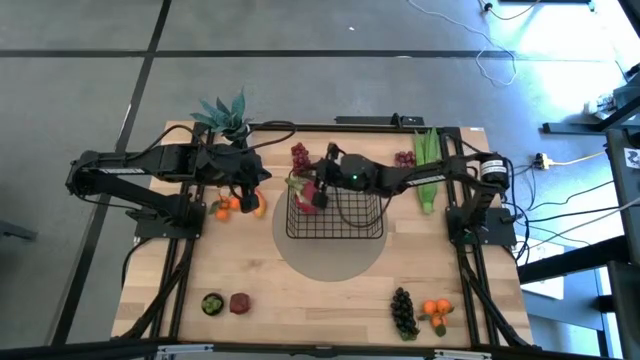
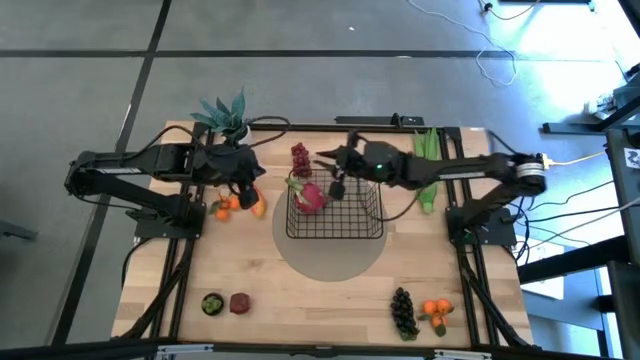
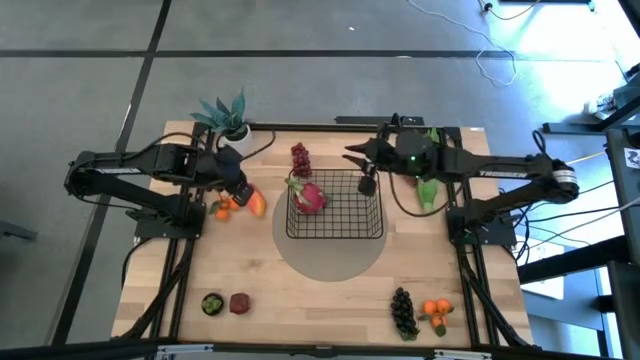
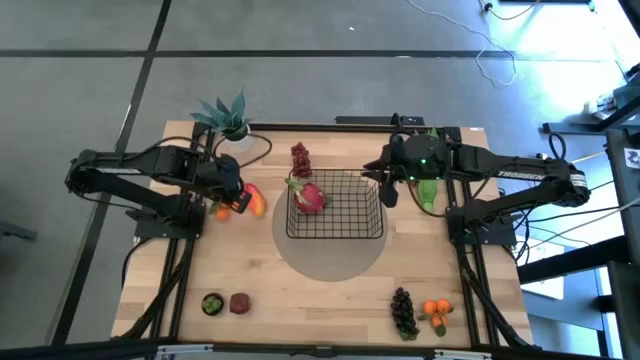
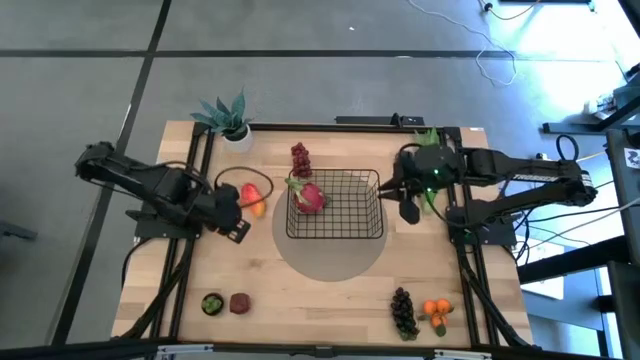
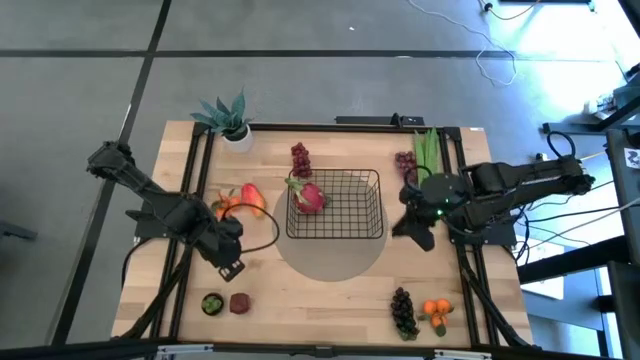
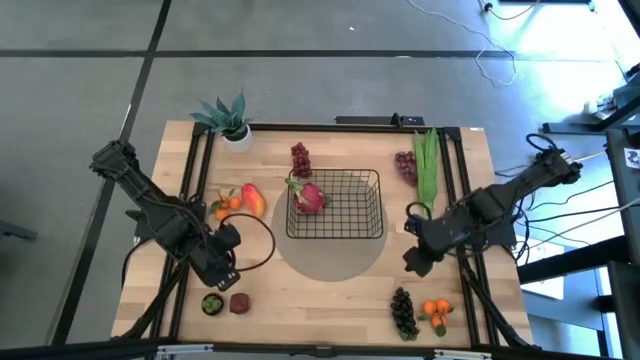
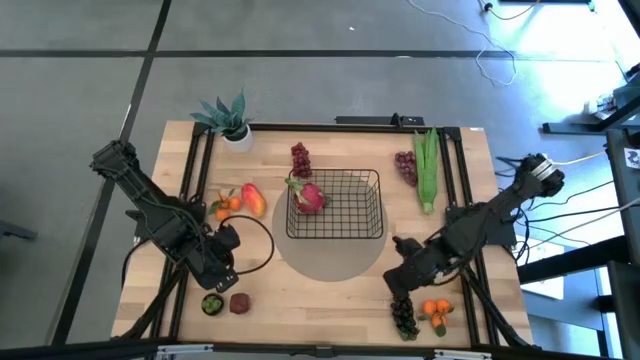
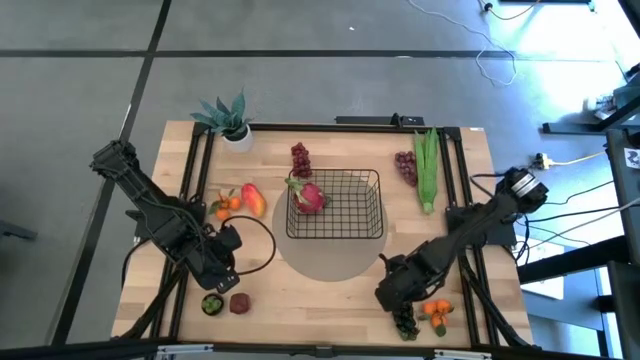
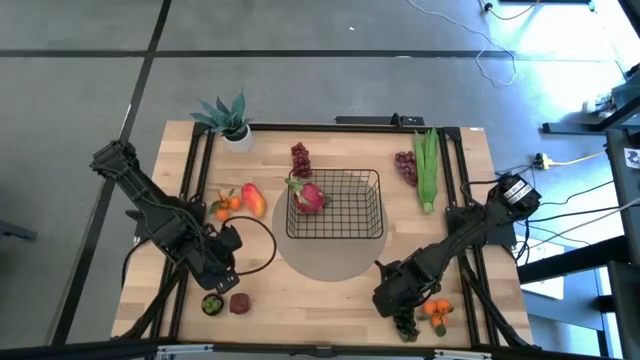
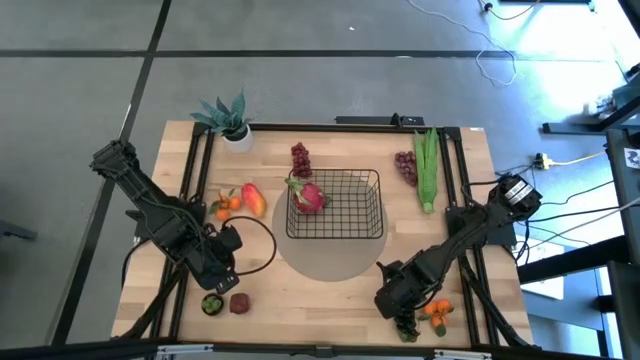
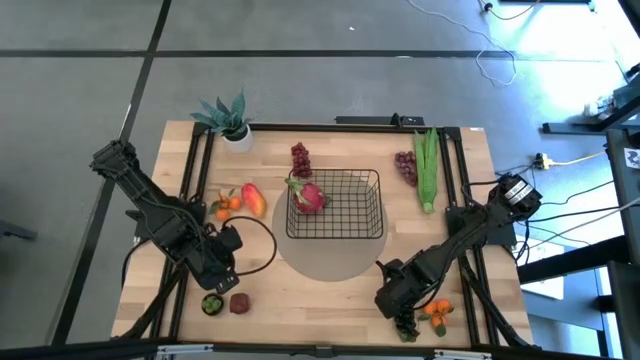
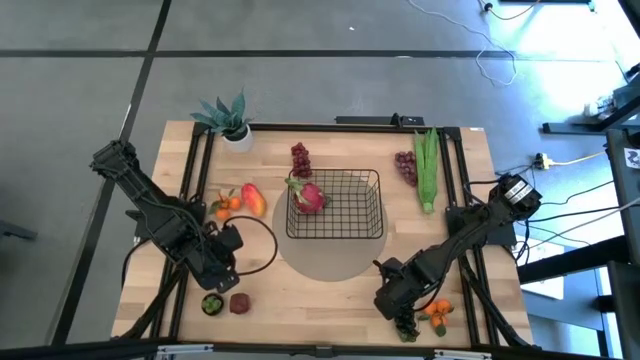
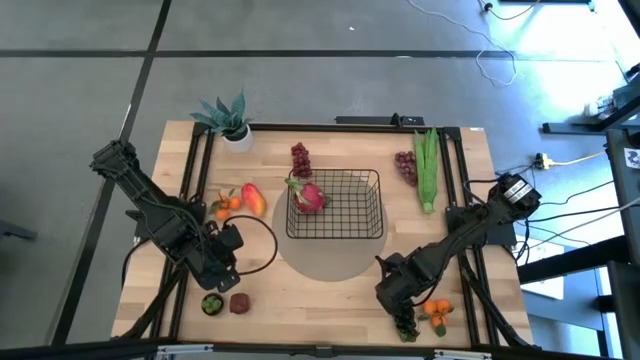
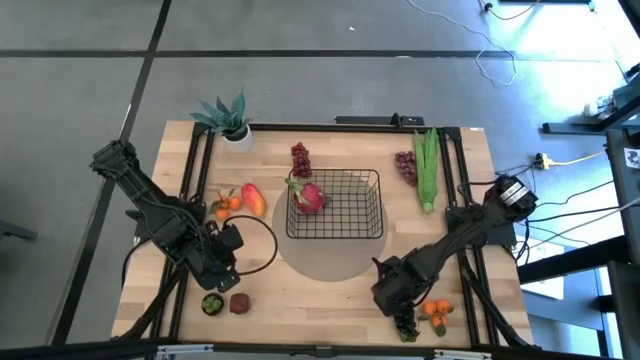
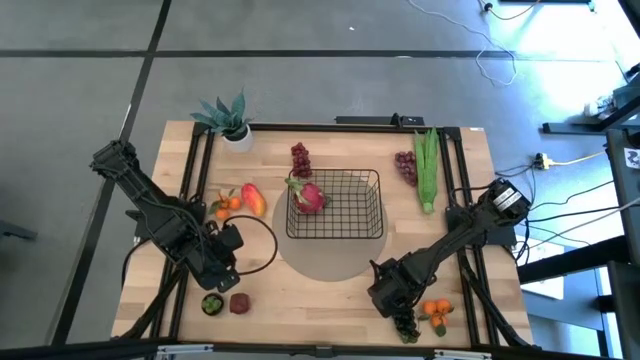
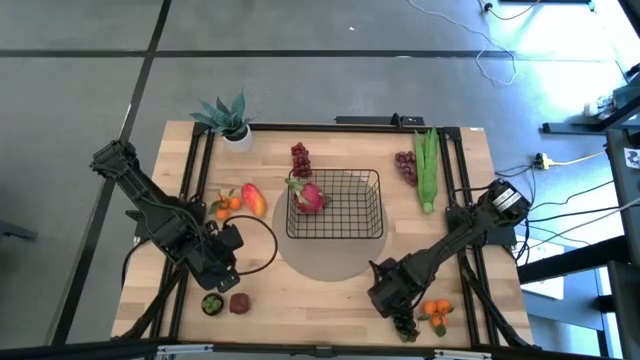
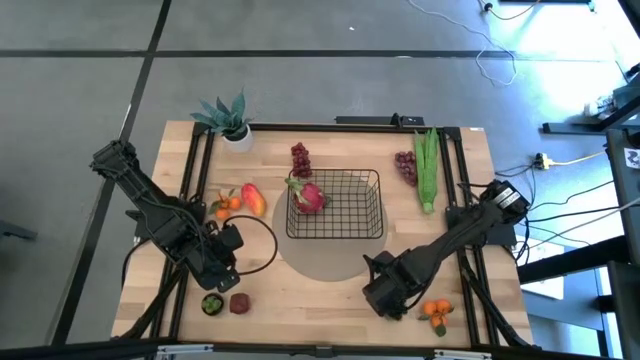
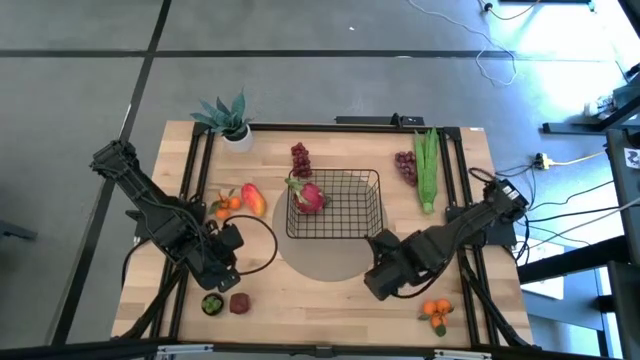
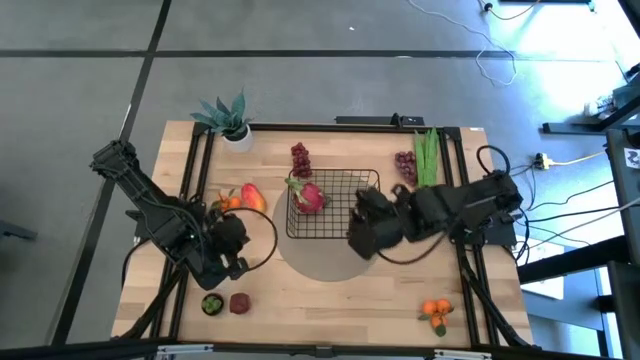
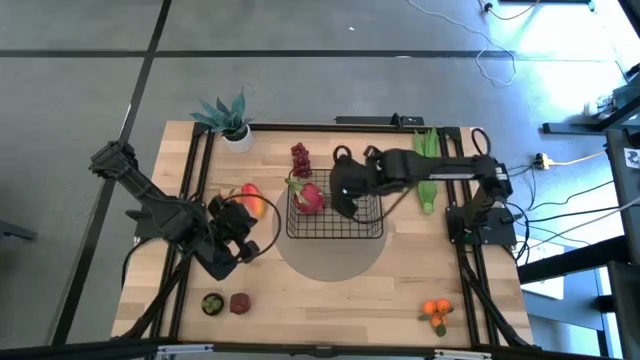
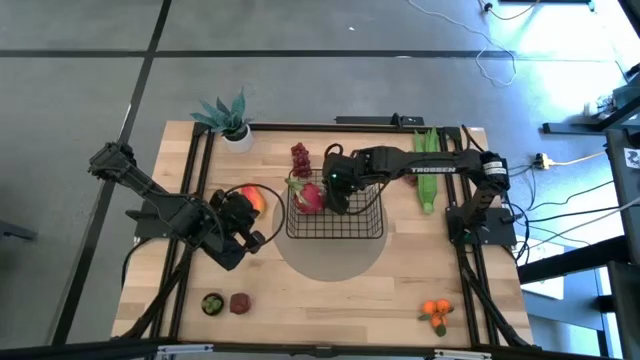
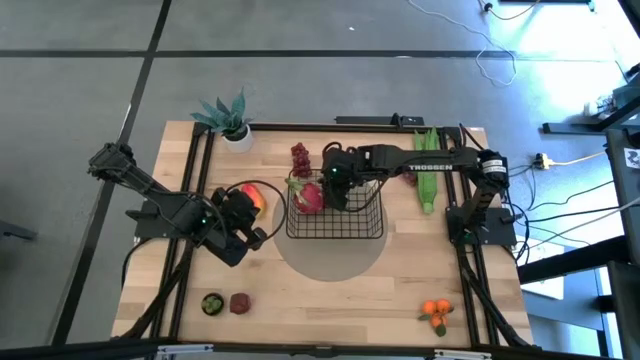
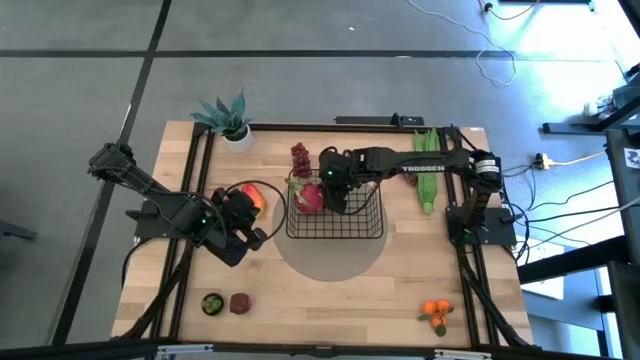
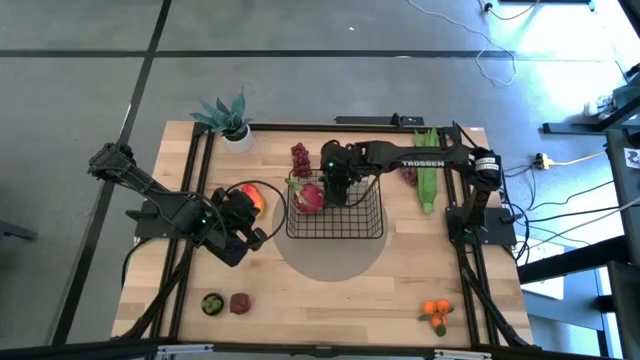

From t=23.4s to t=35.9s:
Task: Build produce basket
Put the black grapes into the black wire basket

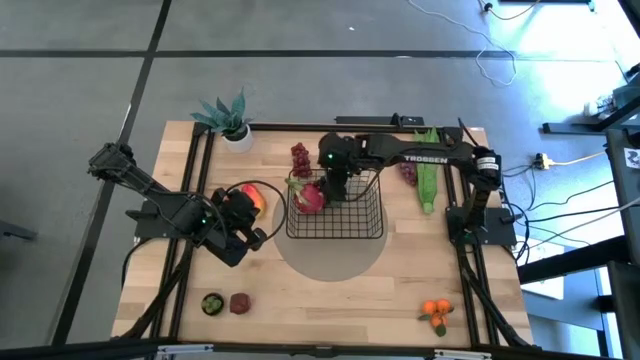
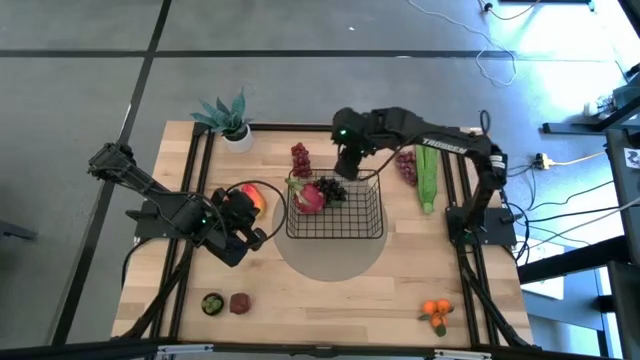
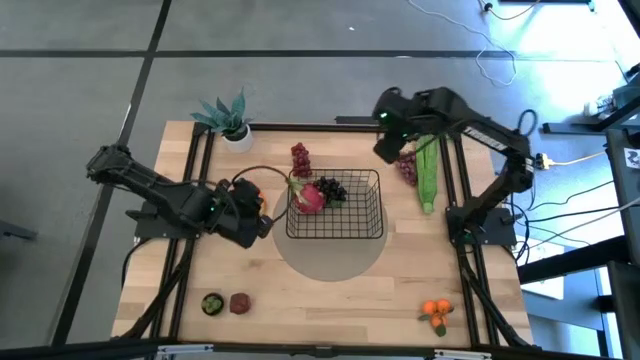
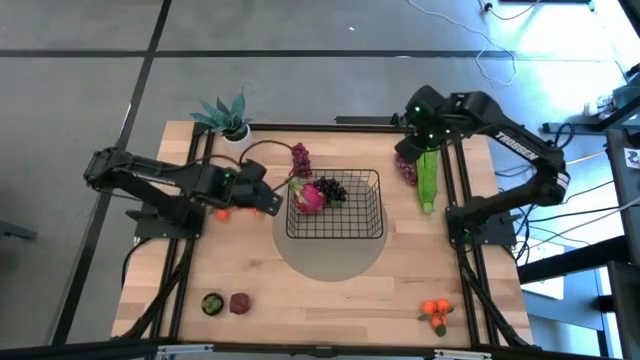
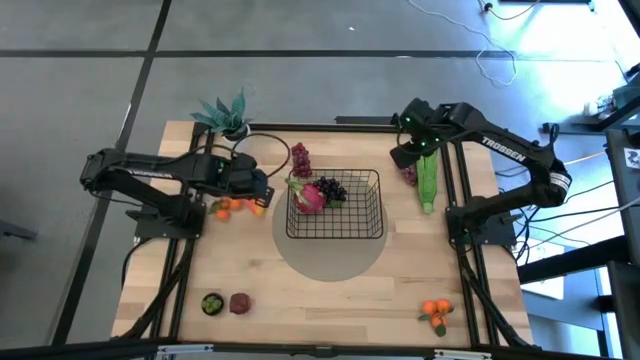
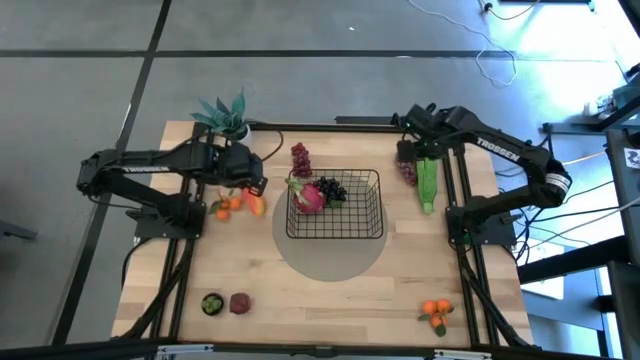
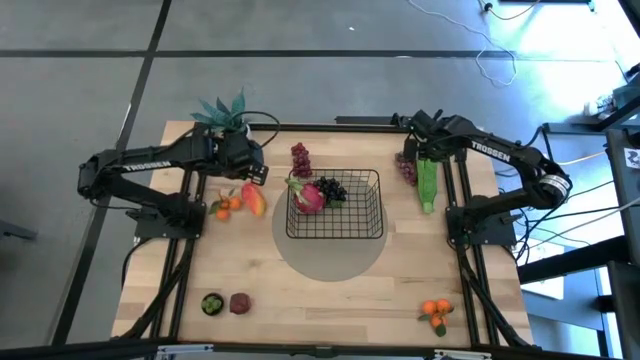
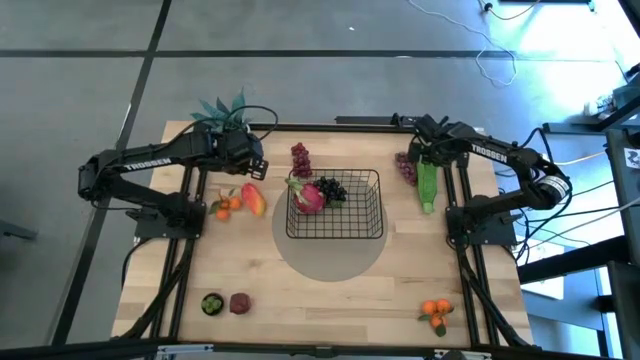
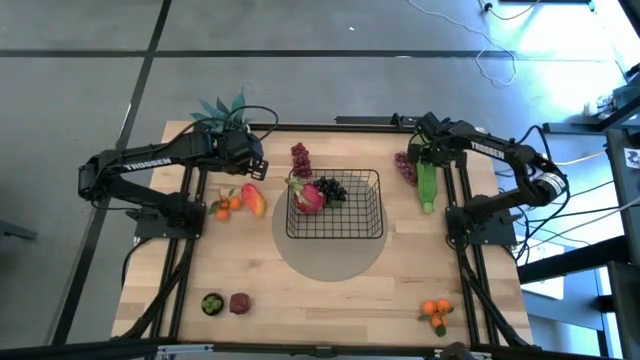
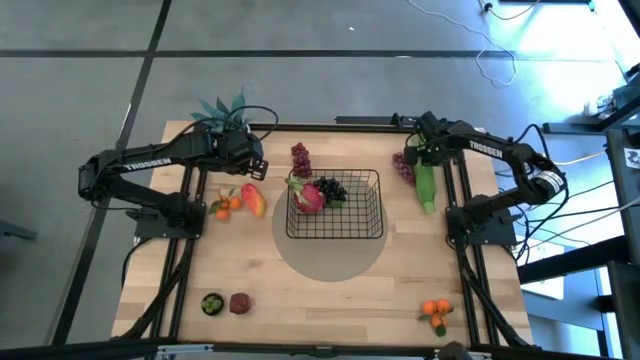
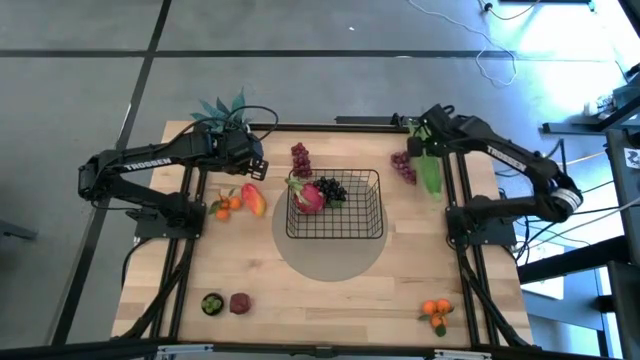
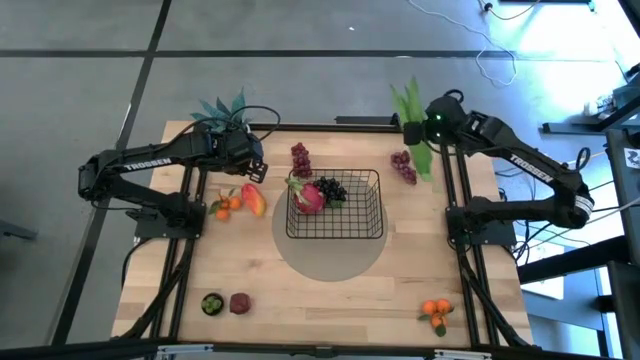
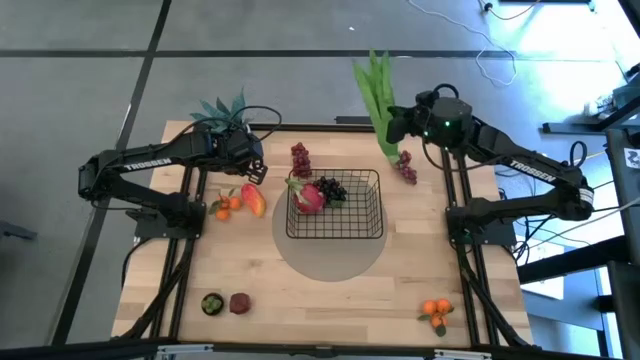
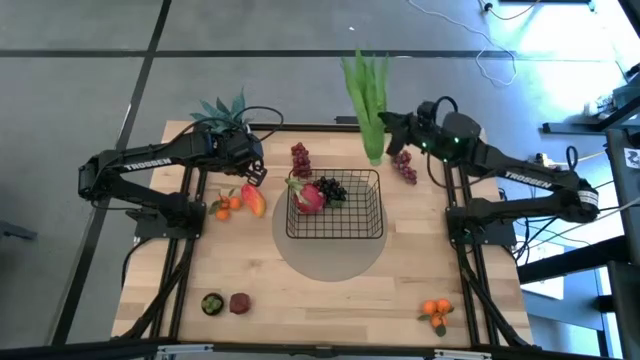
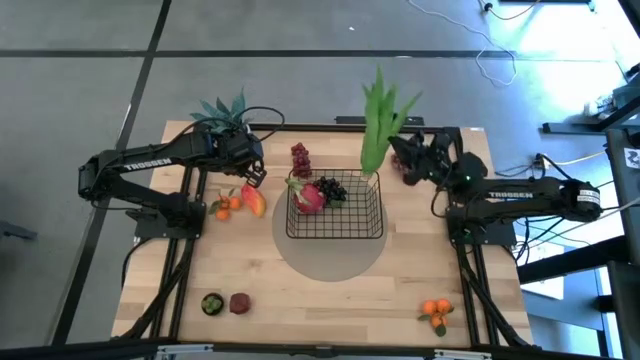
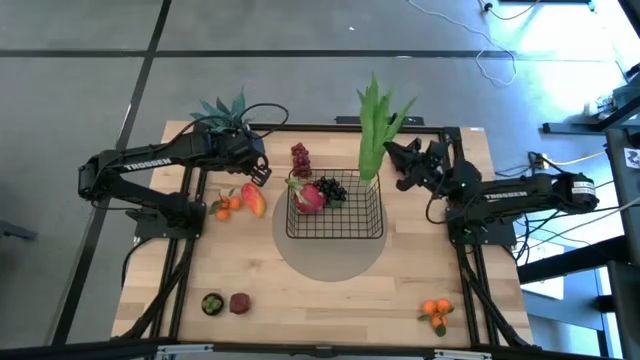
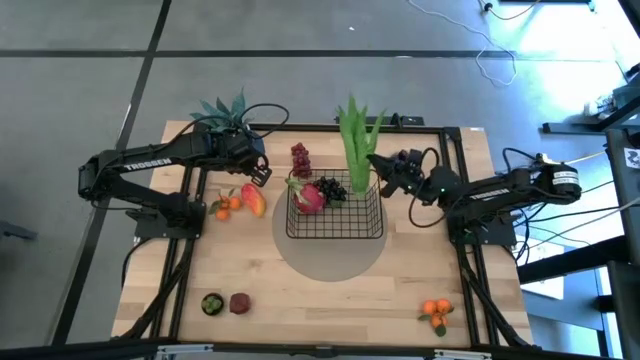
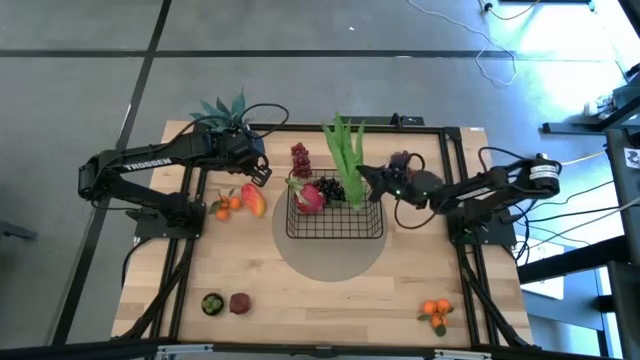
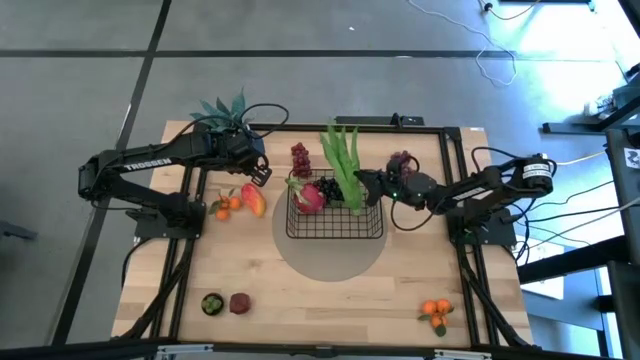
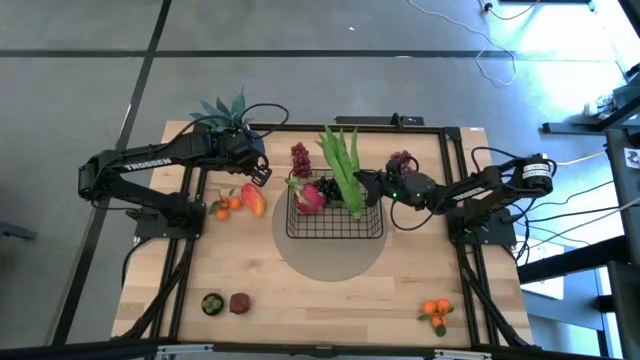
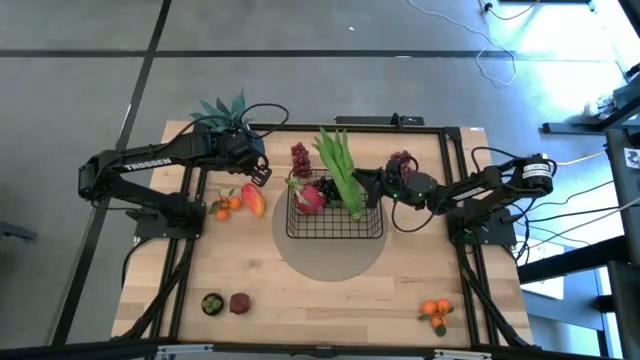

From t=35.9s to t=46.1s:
Put the green leaf lettuce into the black wire basket
